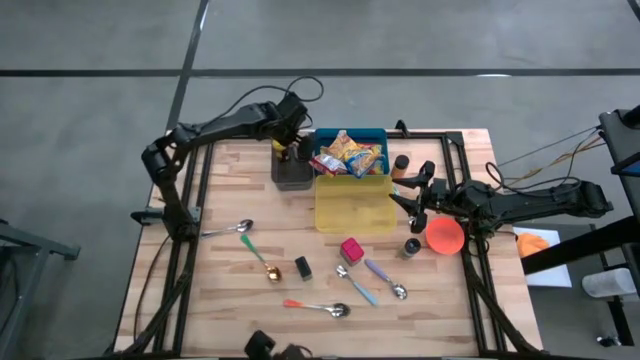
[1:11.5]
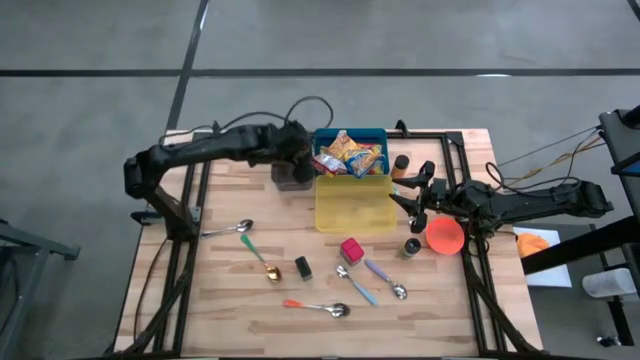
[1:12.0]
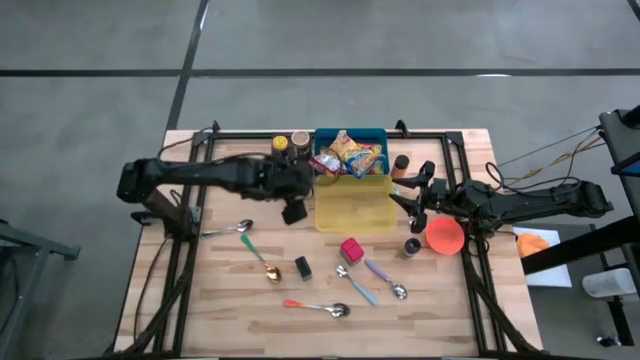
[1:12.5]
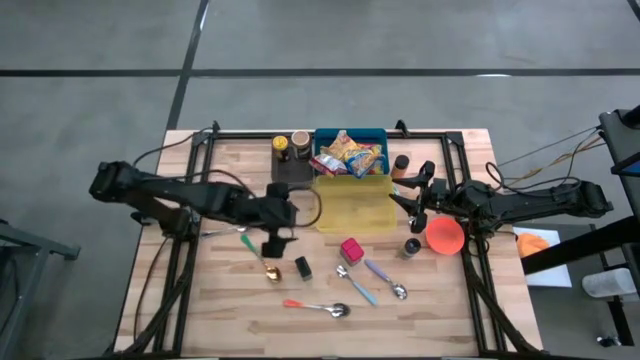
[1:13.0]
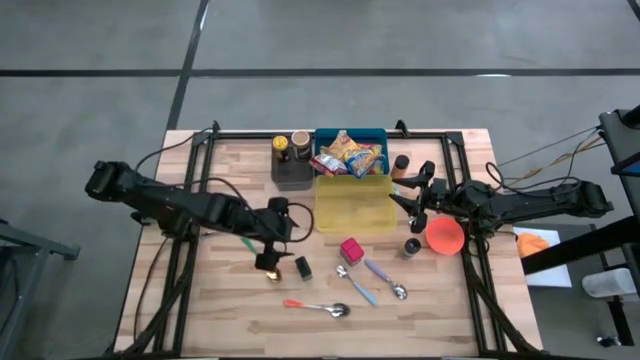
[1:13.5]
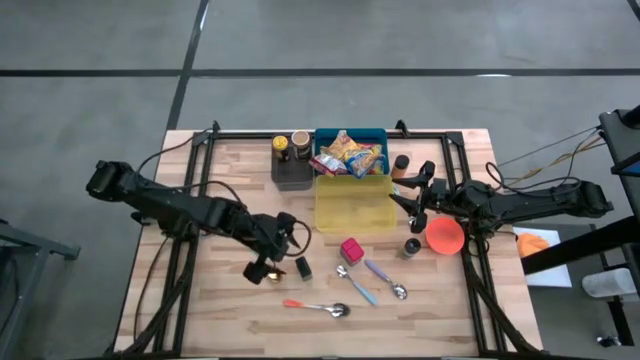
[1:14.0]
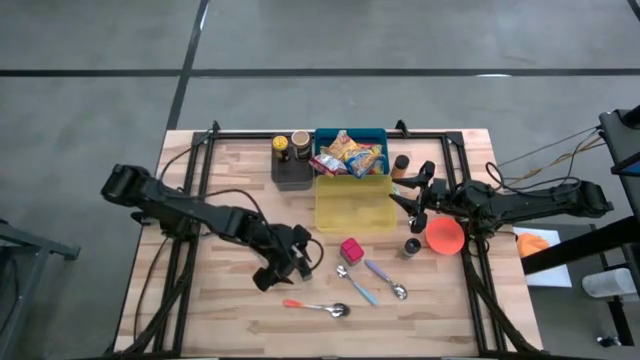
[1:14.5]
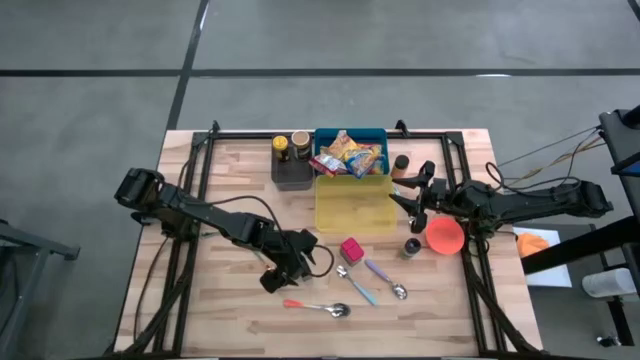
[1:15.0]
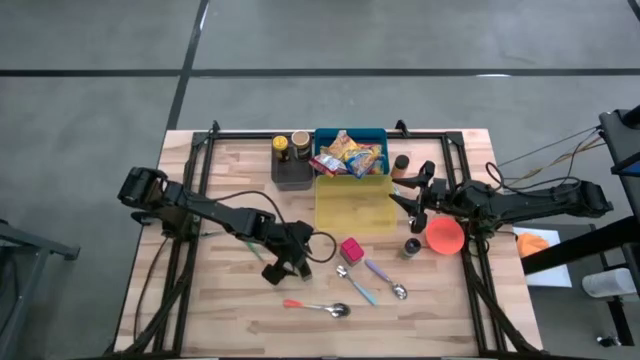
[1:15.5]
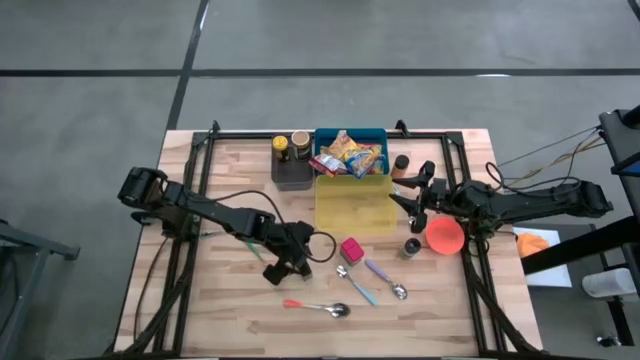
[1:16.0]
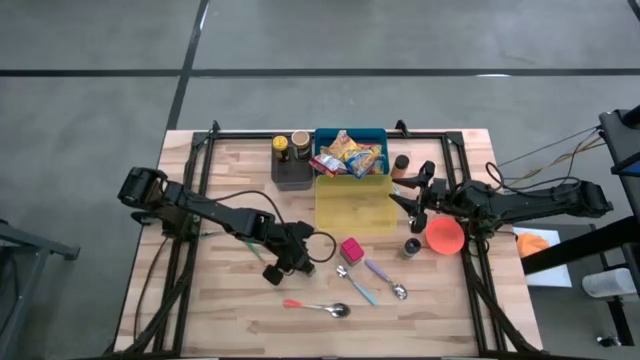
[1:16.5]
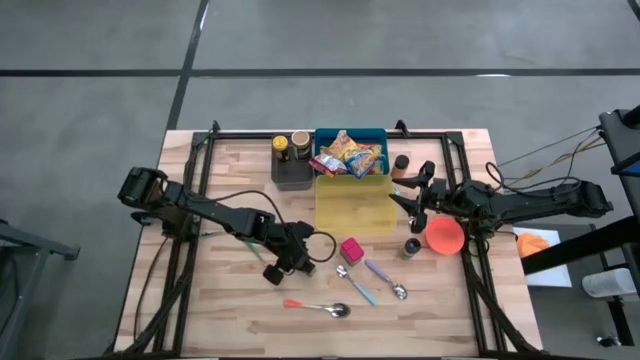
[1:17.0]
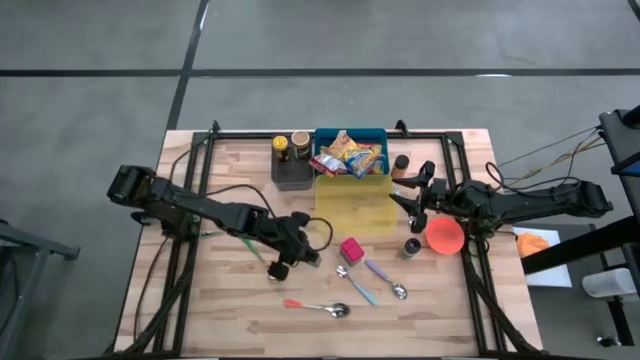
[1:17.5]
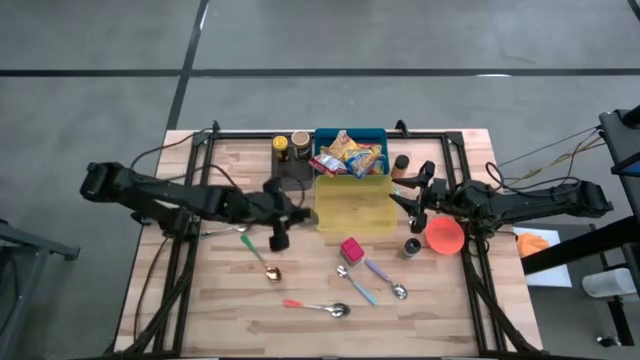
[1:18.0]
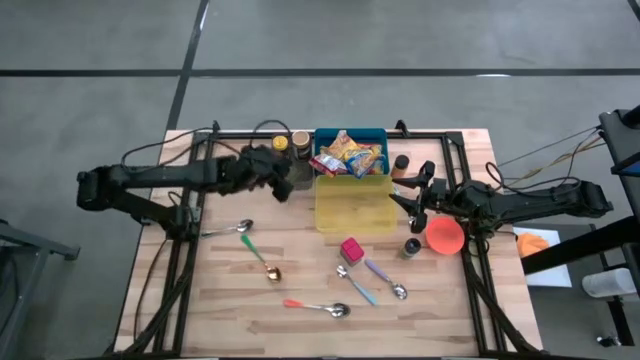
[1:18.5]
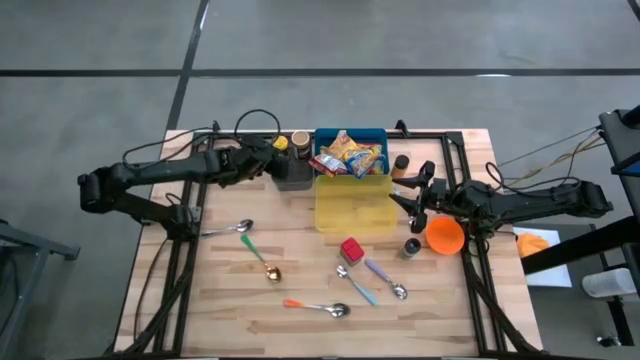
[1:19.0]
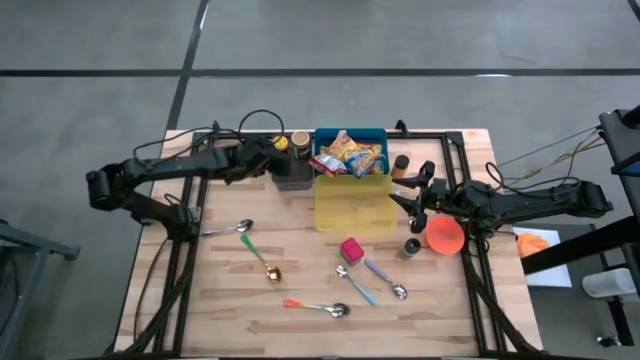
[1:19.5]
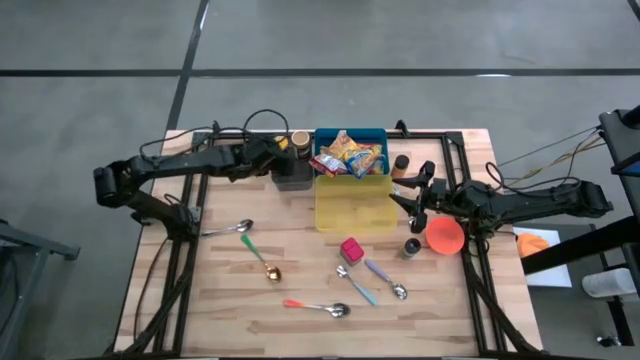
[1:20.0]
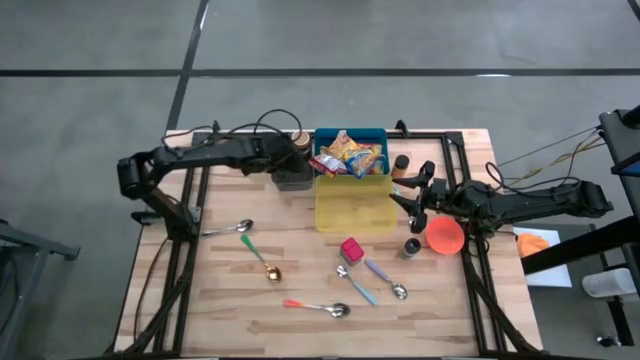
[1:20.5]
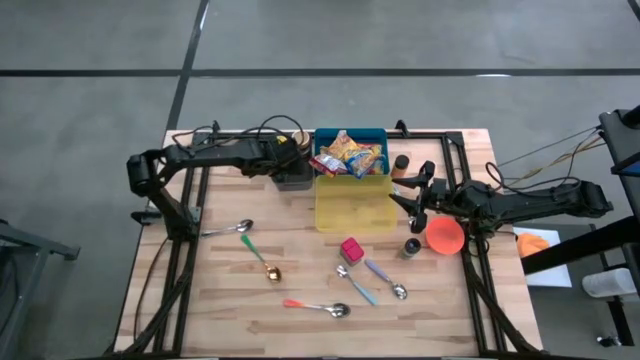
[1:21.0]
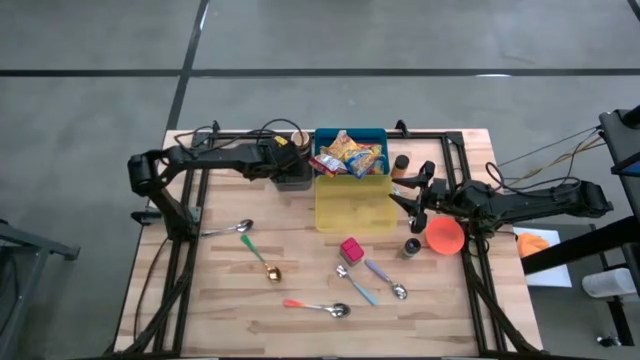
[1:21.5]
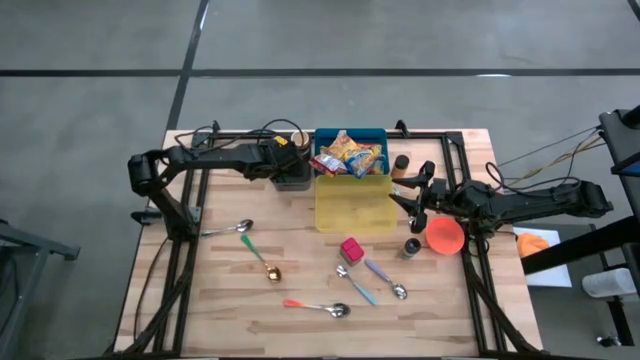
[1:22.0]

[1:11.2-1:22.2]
Put the black spice can into the black bin

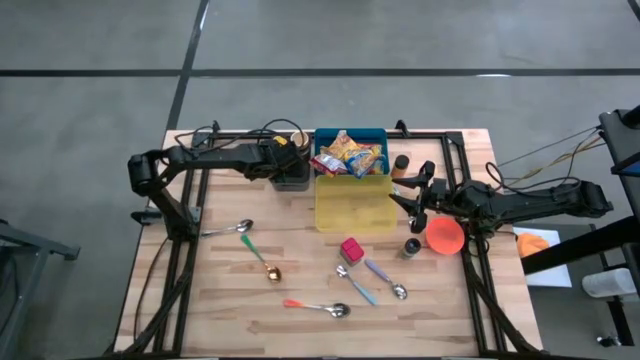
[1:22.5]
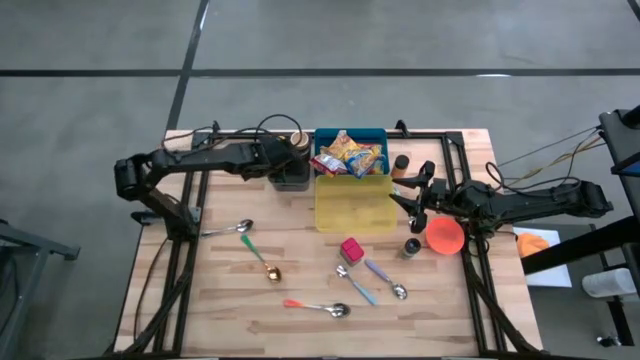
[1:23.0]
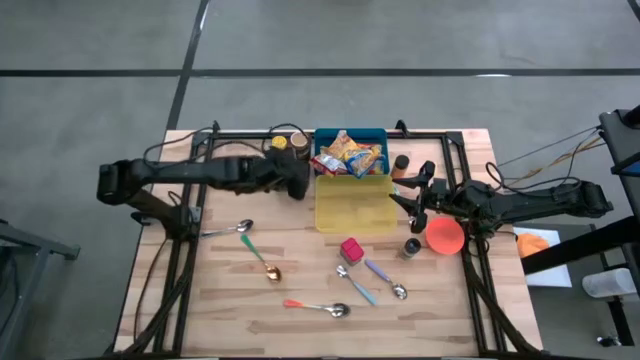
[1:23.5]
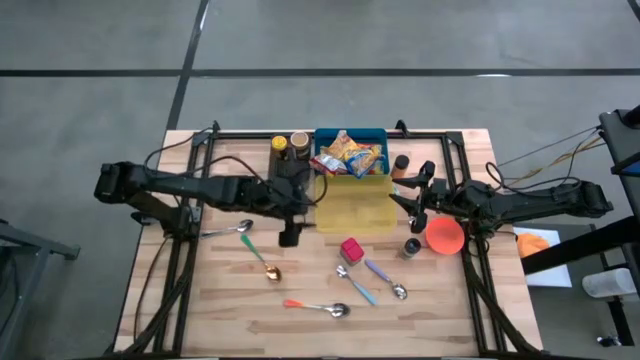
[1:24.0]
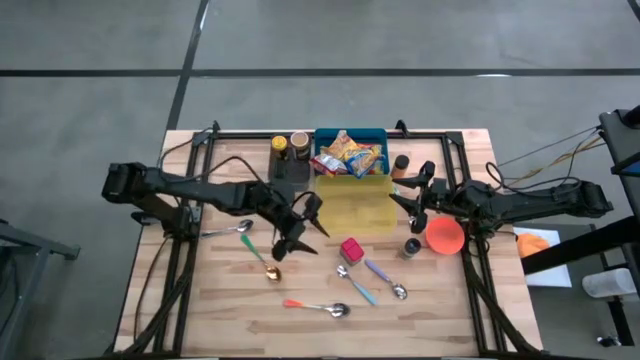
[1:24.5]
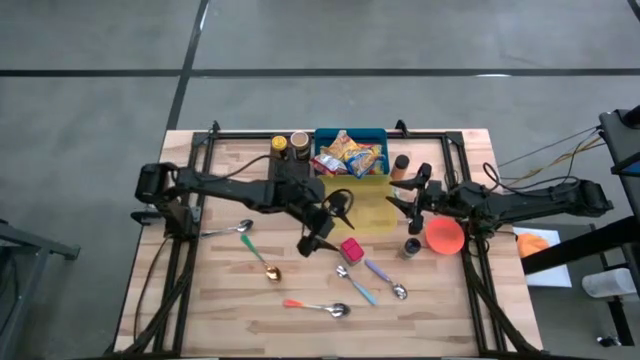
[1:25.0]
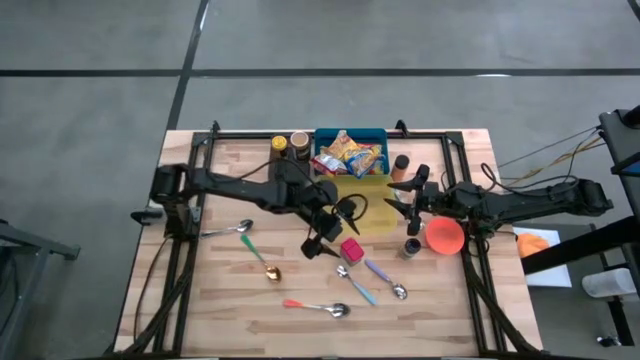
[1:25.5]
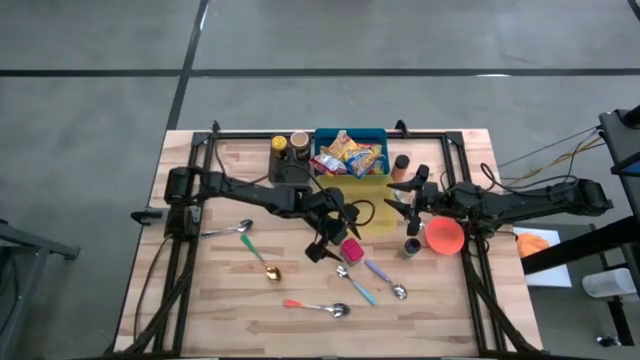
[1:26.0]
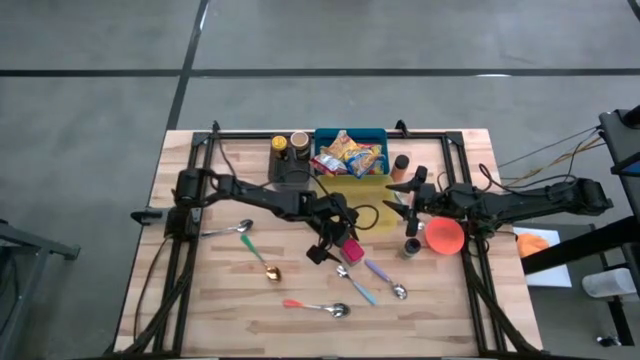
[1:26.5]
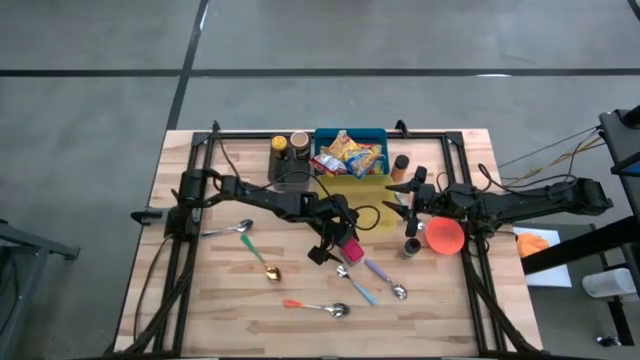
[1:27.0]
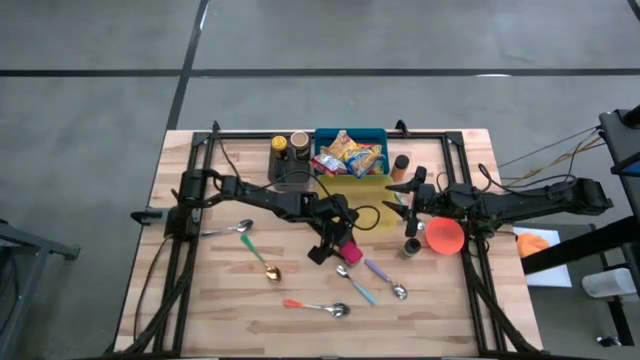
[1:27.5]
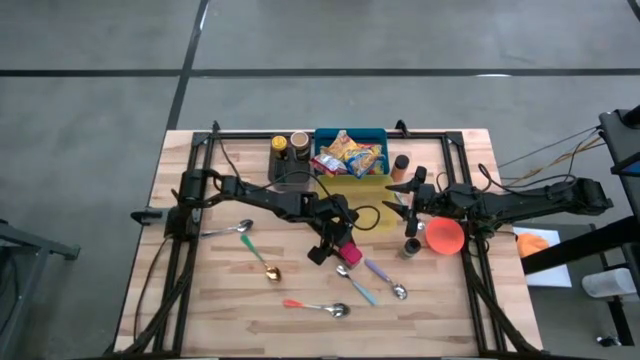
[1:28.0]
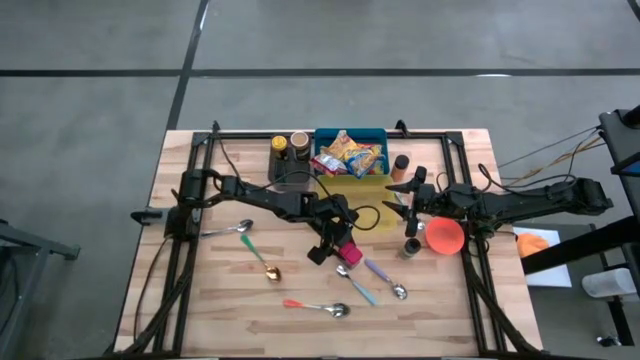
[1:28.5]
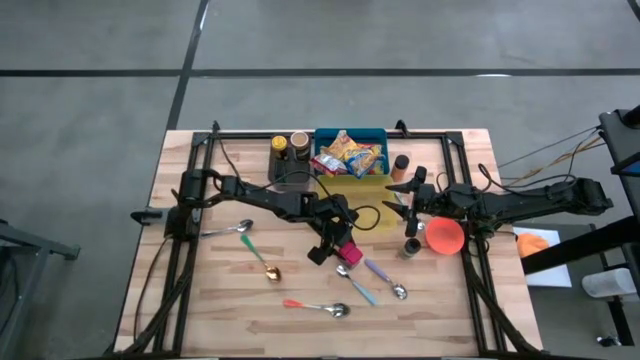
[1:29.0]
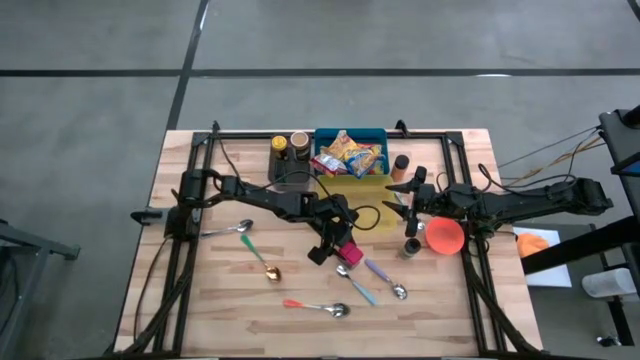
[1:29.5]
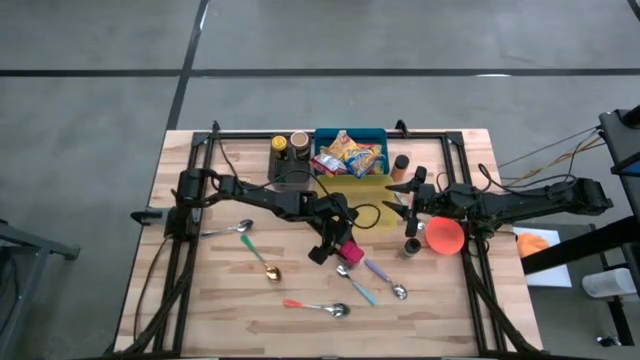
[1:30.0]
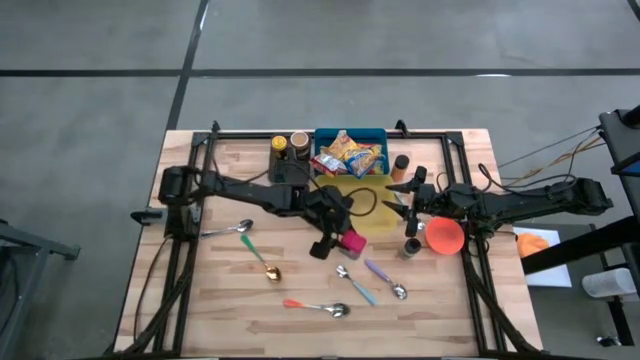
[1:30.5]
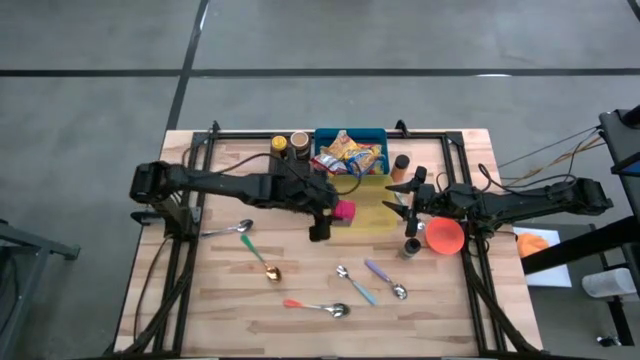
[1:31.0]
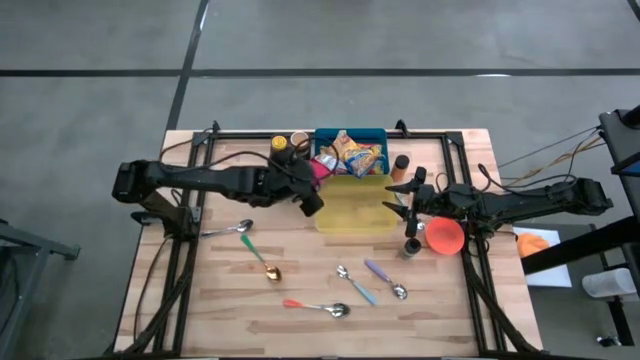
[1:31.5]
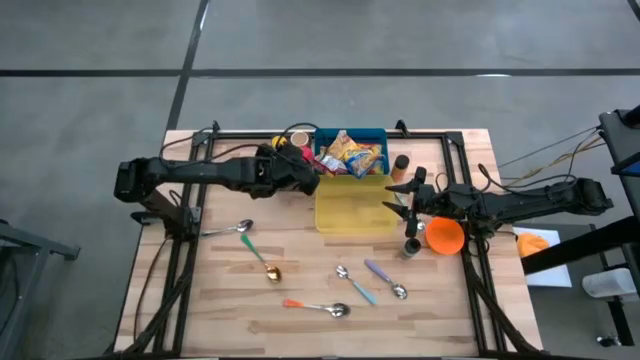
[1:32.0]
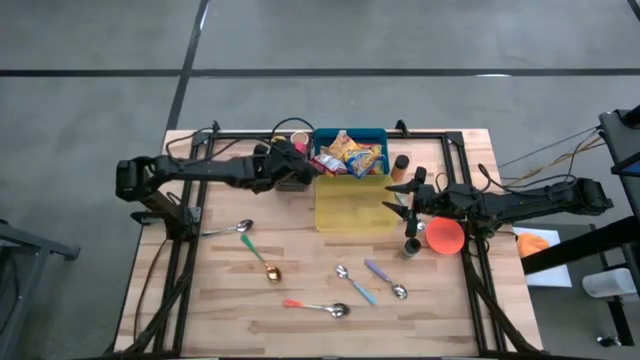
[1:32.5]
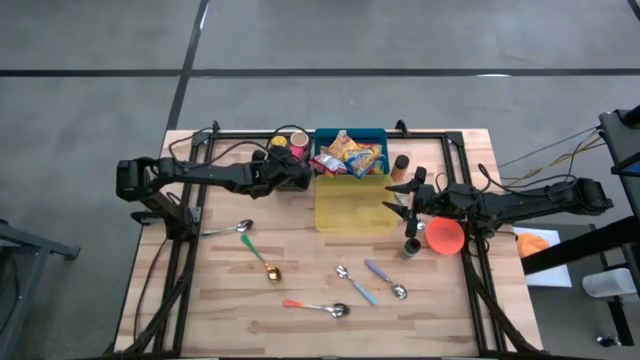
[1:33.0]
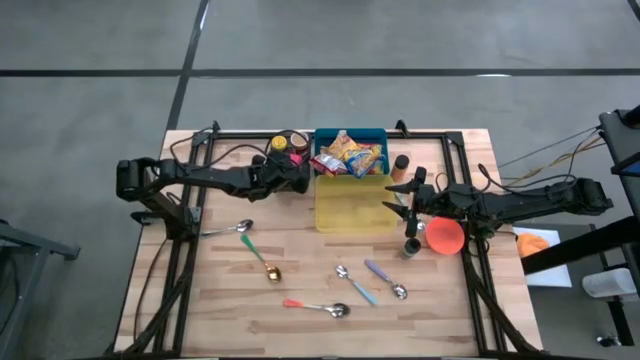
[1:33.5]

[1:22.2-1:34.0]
Put the red spice can into the black bin
